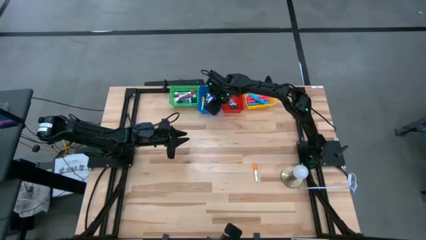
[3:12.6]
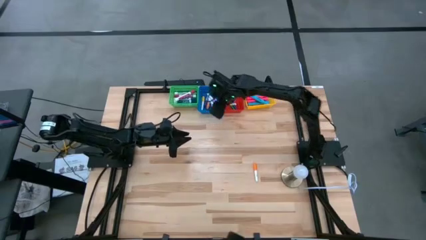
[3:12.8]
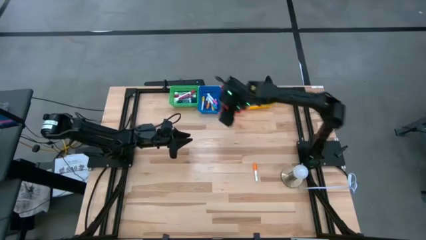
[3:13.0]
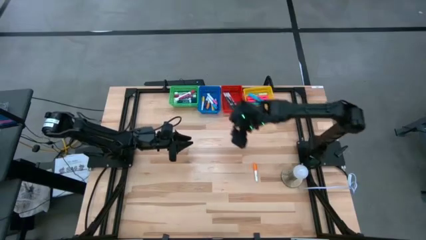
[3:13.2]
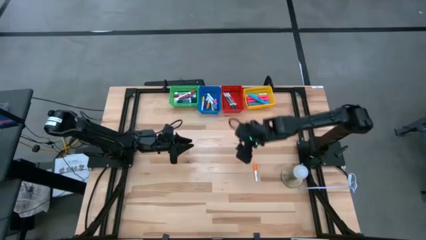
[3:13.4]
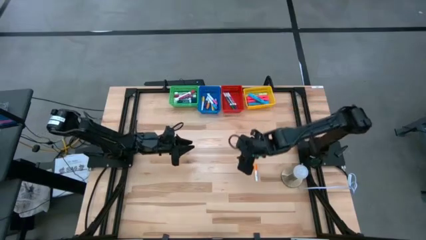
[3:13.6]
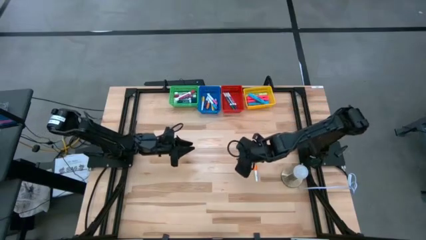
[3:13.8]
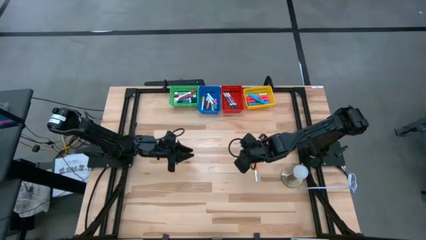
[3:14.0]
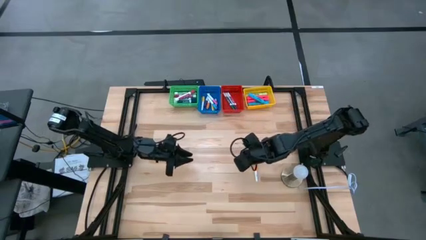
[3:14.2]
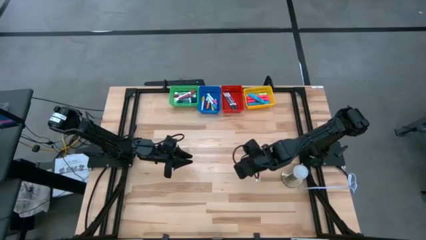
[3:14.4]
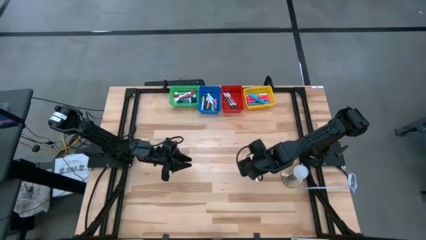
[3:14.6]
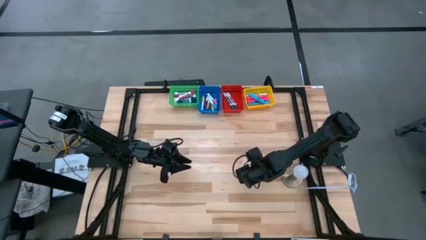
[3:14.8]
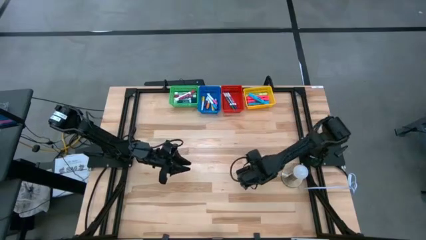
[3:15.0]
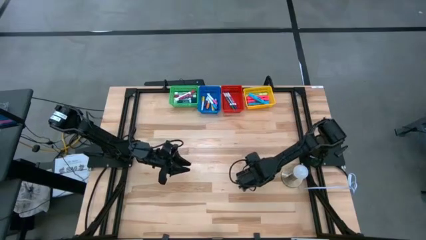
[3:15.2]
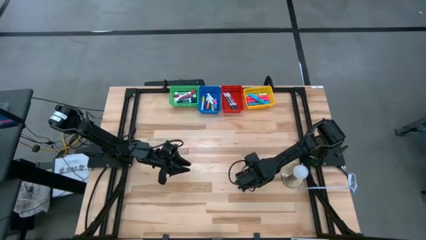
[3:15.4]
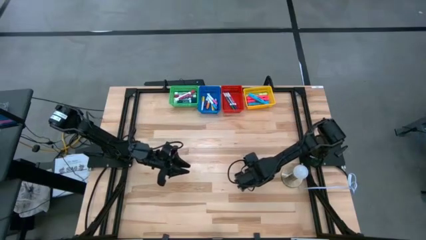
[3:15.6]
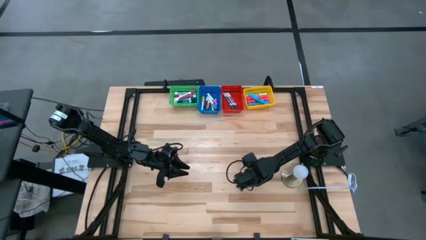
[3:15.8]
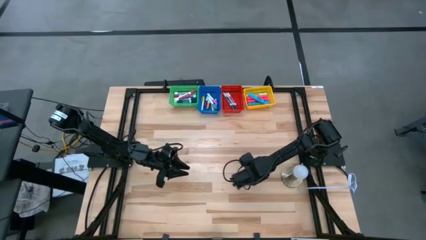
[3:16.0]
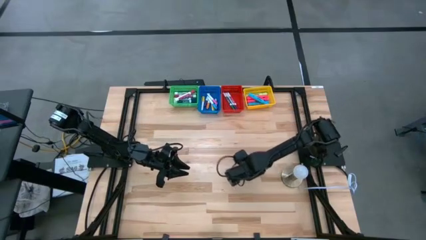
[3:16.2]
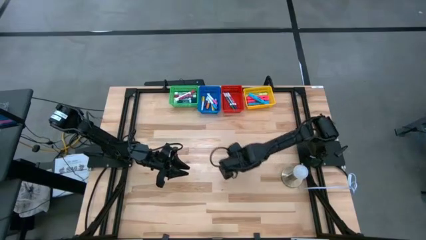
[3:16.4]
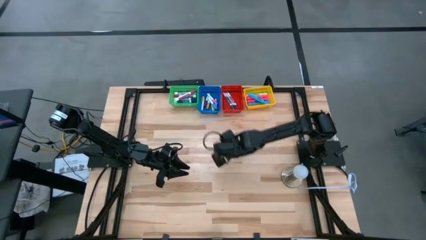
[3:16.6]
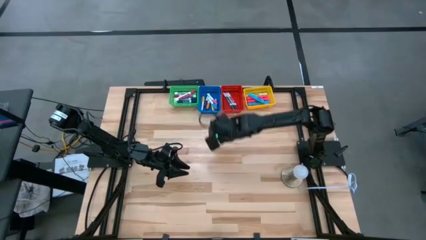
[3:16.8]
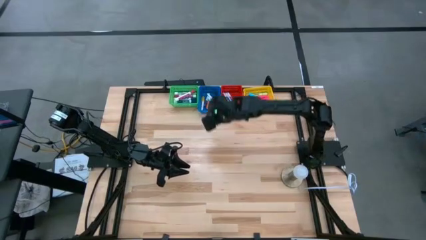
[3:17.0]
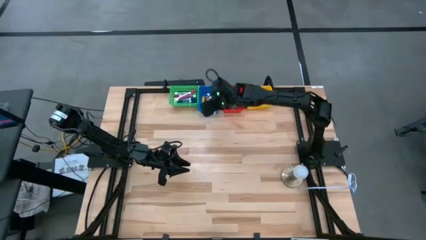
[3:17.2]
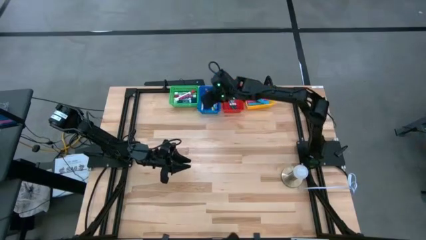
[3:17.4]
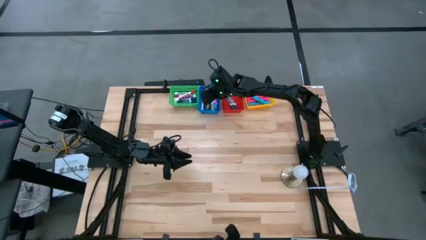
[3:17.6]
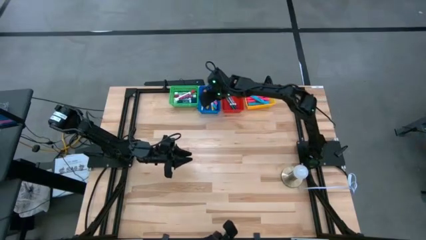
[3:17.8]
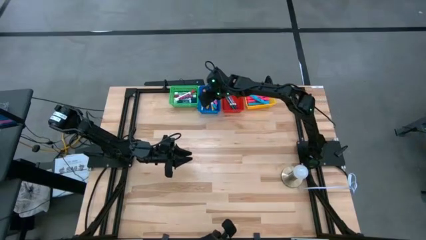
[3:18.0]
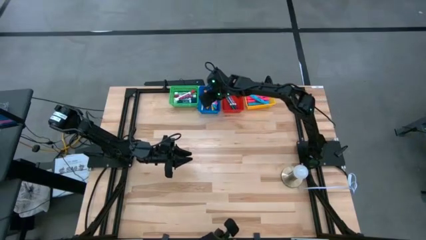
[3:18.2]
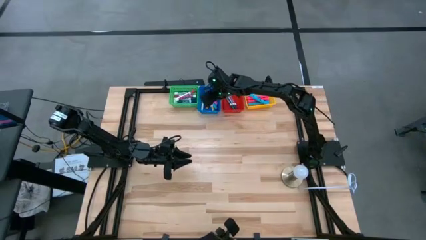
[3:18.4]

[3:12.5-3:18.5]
Task: Pick & Place Markers
Put the small orange highlighter pen into the blue bin

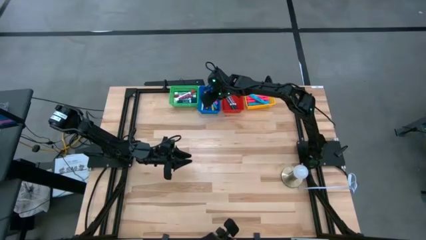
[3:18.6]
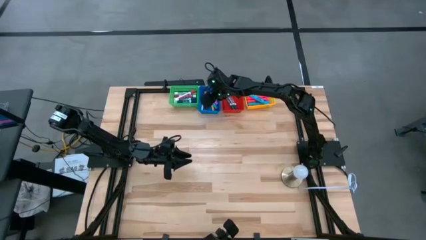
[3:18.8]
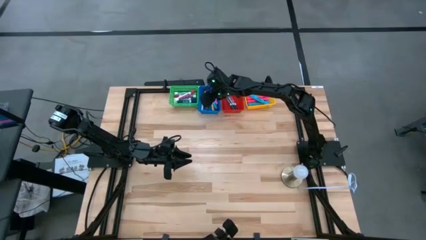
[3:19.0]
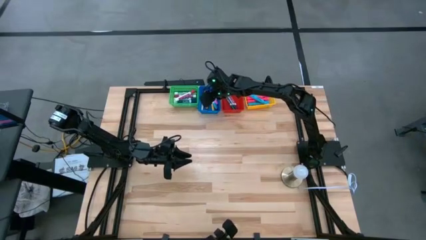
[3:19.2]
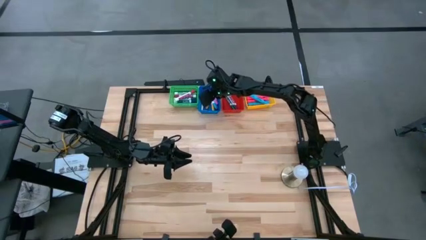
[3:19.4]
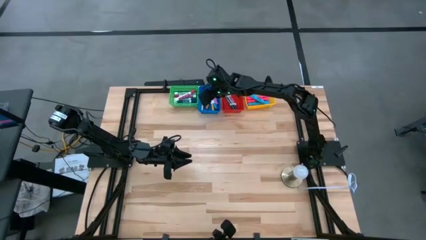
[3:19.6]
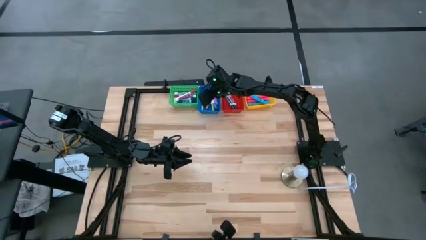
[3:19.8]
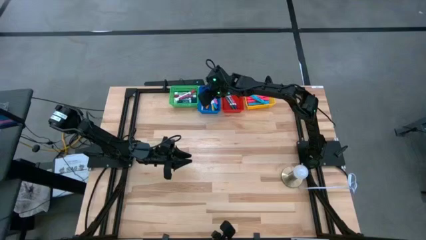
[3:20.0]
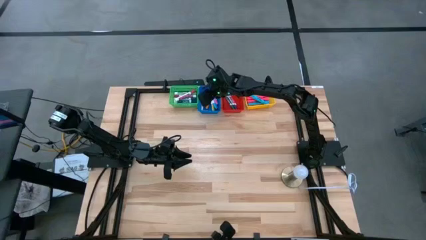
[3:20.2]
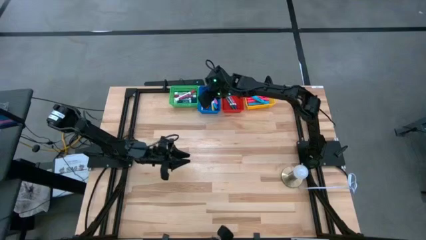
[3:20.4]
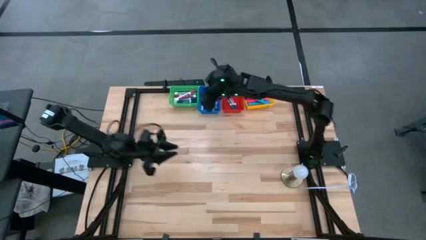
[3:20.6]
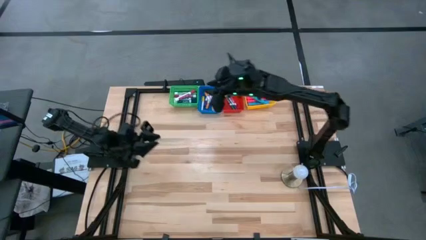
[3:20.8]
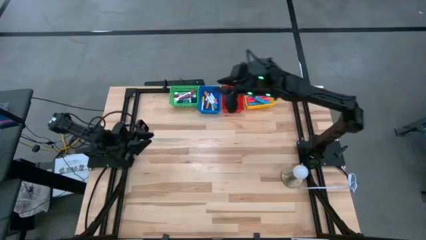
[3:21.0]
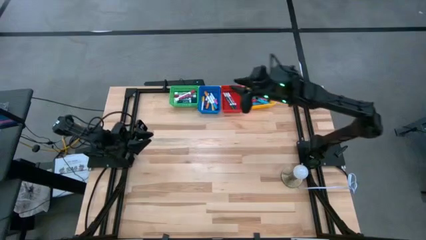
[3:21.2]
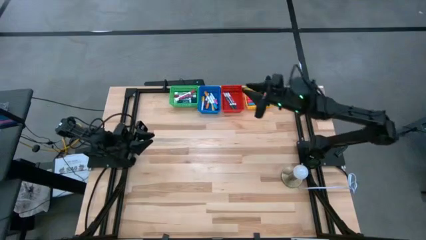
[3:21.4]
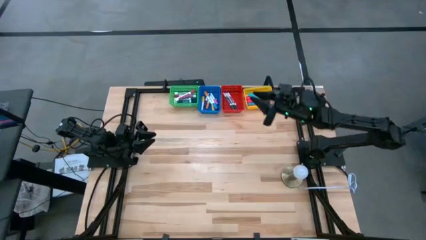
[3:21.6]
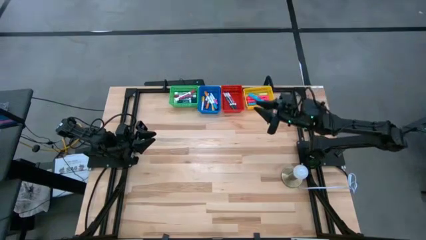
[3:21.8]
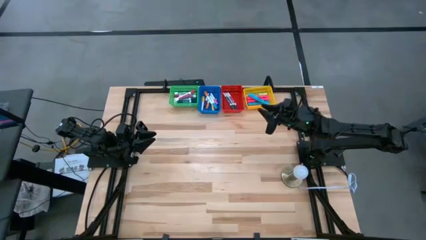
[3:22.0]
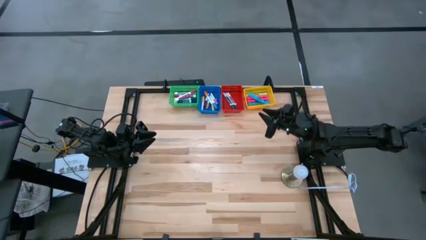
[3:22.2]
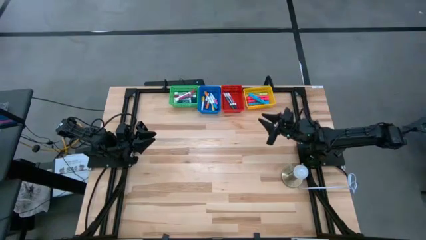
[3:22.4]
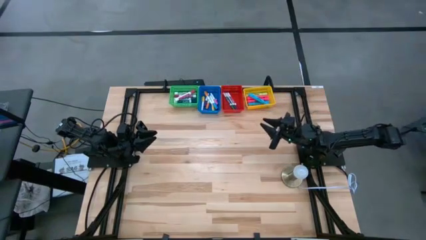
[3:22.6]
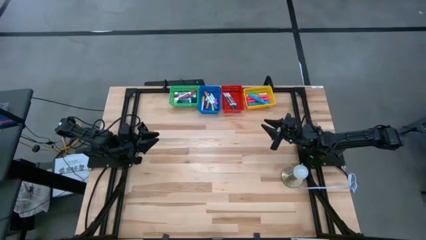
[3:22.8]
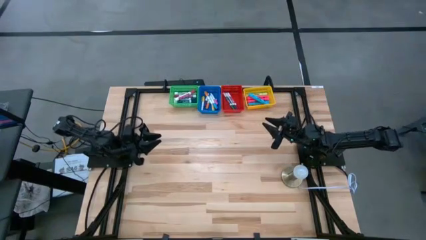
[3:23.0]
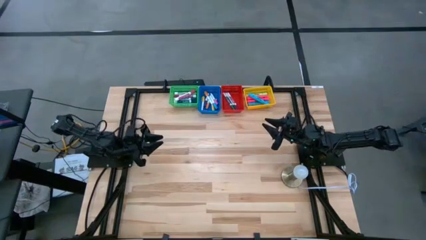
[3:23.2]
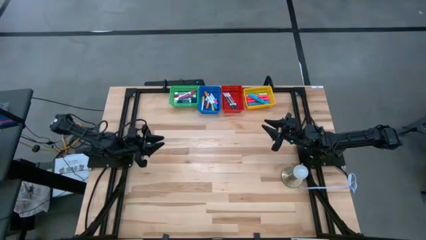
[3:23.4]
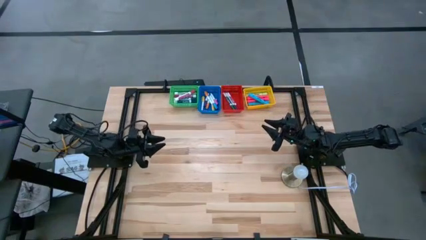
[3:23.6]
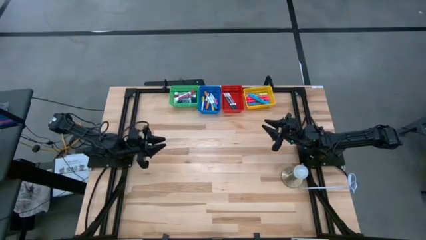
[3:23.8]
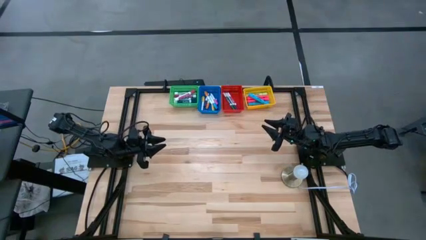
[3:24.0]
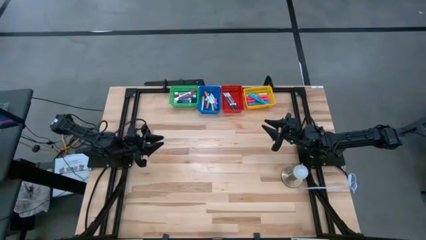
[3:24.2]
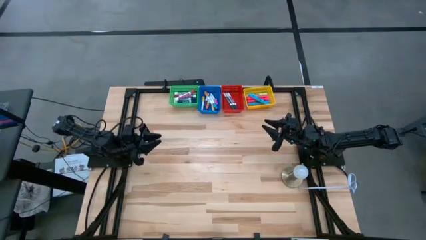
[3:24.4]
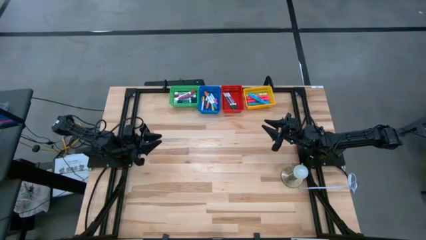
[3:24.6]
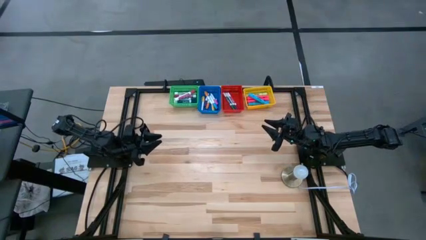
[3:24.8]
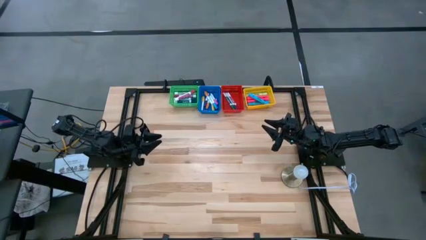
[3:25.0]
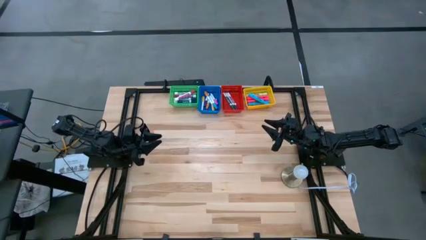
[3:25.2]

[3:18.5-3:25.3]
Return to Home Position

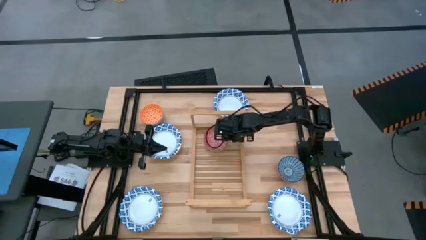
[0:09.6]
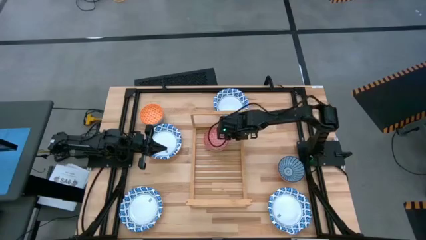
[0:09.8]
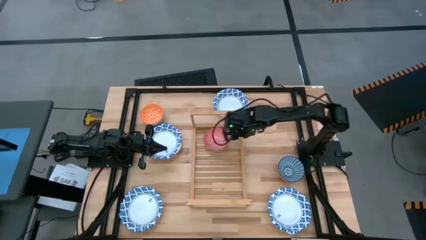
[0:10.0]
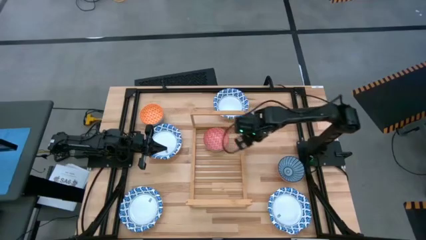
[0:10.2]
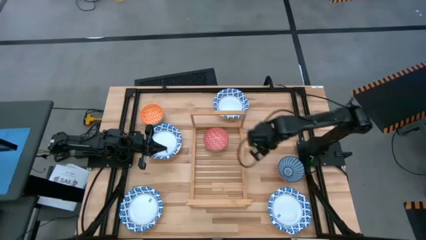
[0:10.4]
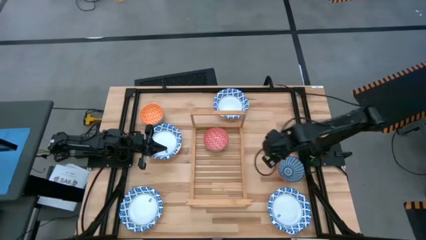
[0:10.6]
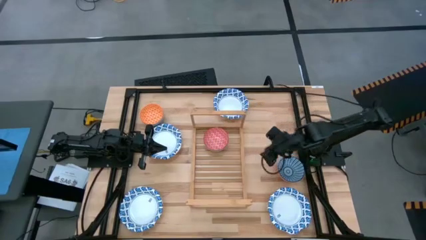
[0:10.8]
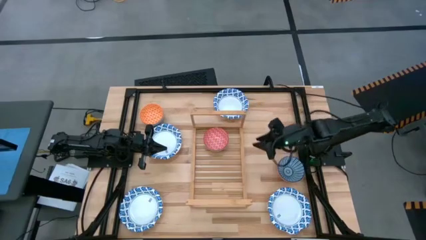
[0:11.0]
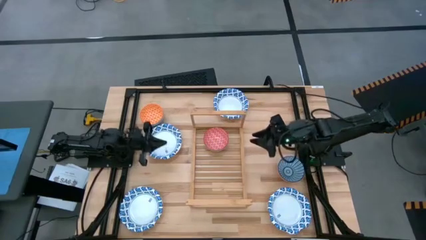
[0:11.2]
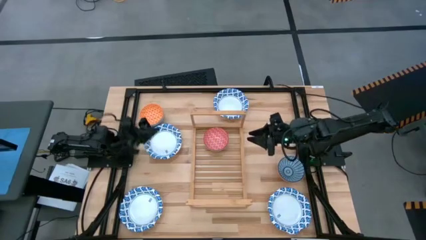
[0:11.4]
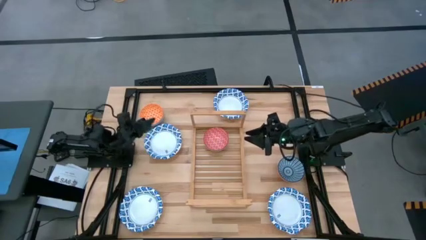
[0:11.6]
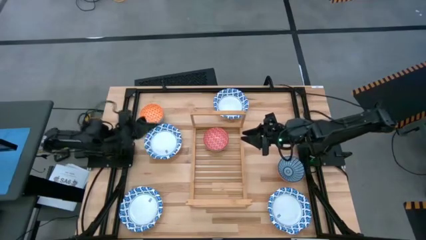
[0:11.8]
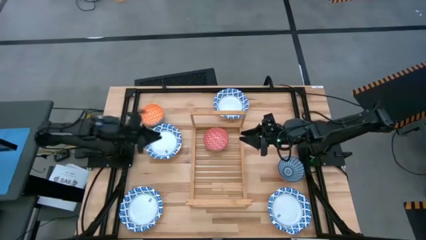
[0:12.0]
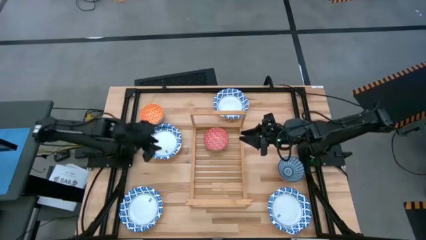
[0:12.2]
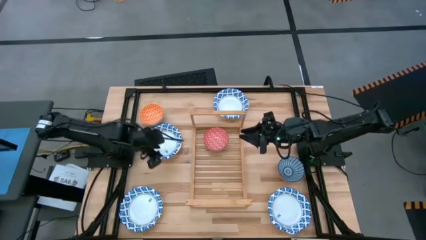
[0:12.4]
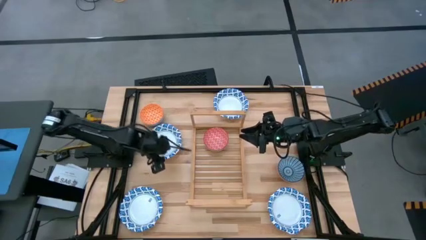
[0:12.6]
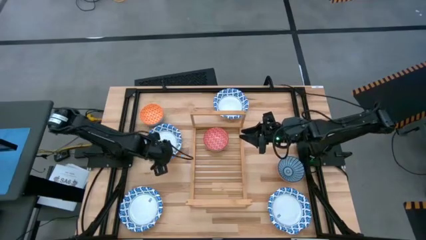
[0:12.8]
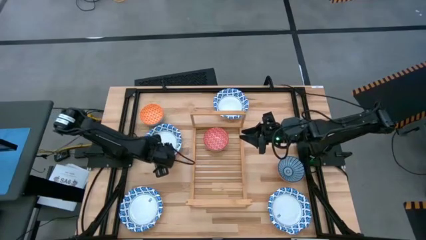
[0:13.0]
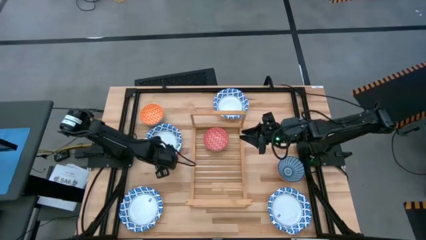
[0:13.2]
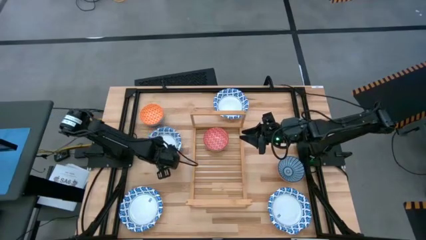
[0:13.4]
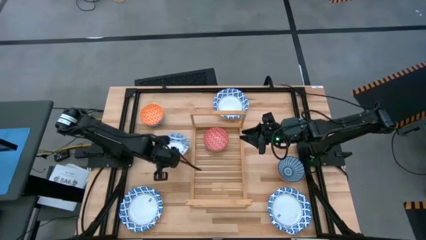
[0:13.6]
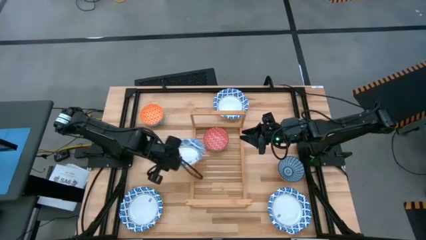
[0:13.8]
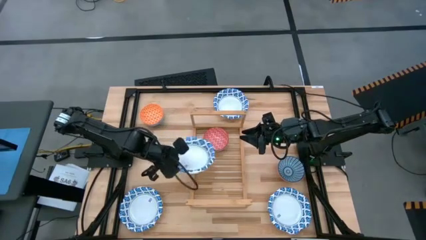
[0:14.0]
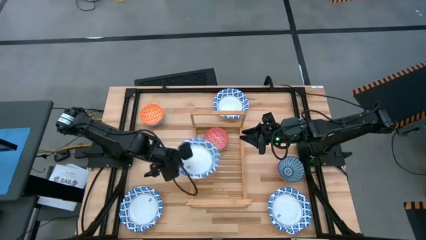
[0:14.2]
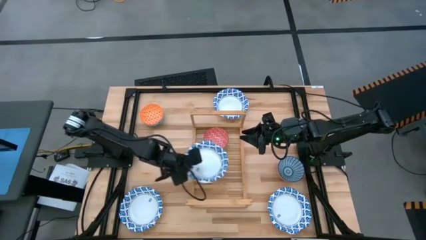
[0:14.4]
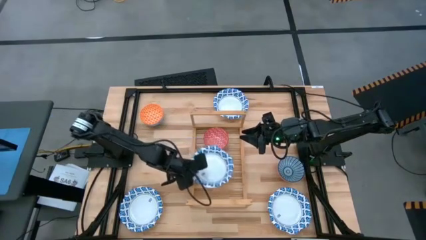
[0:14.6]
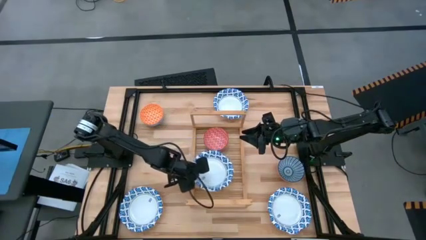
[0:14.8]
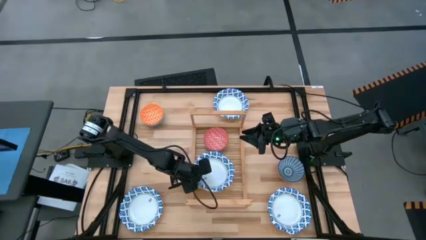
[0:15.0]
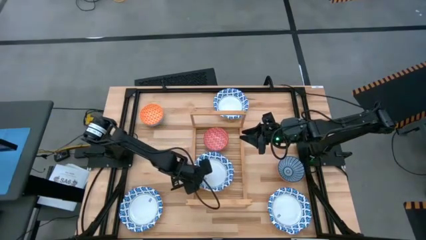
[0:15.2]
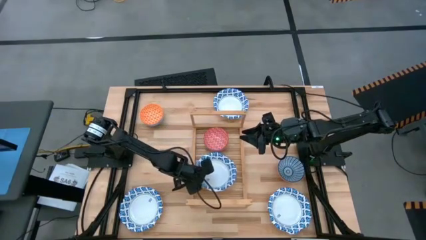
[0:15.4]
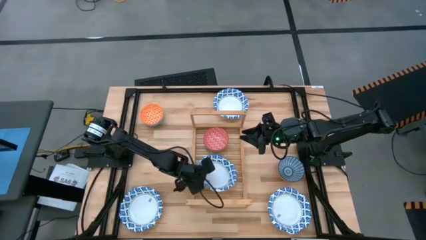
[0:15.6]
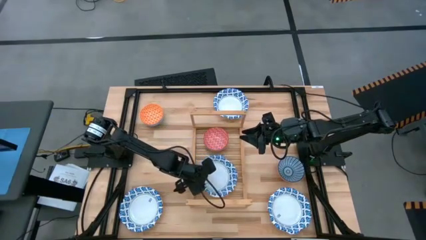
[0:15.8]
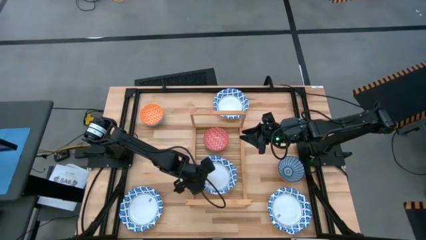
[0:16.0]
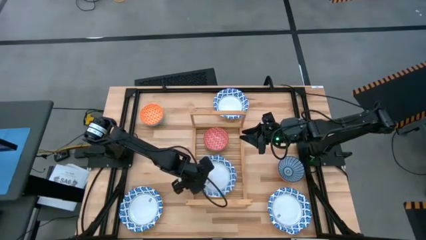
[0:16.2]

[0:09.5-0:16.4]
Task: Place and stack bowls onto a shelf
Put the middle left blue patterned bowl on the shelf
